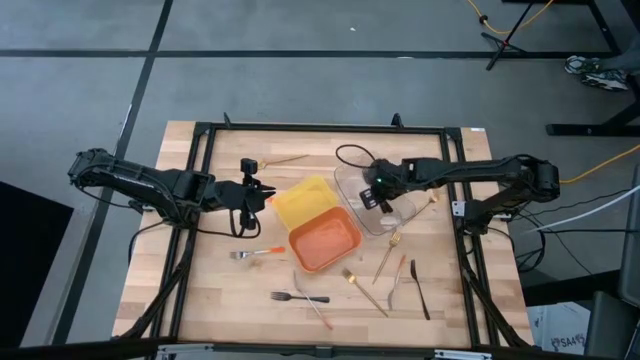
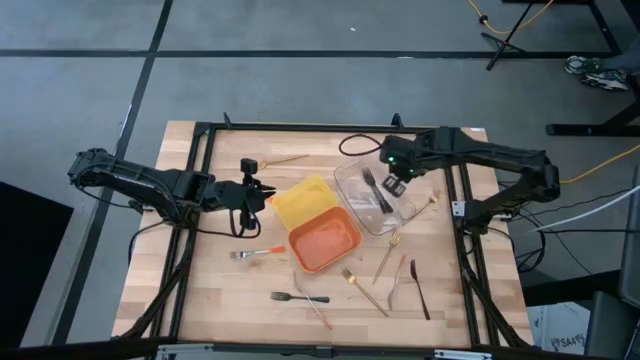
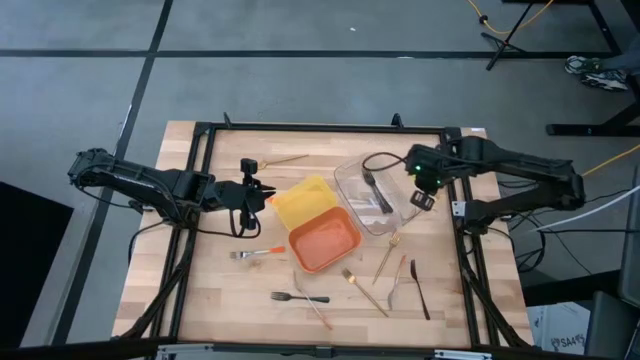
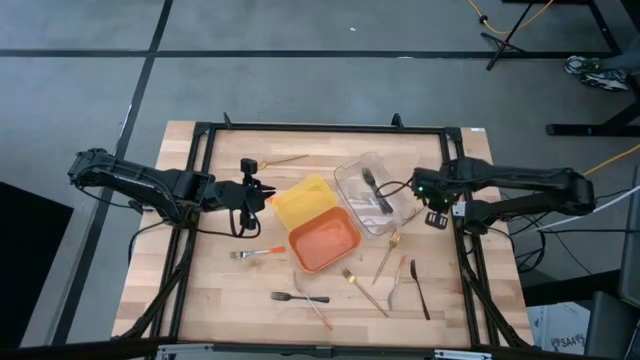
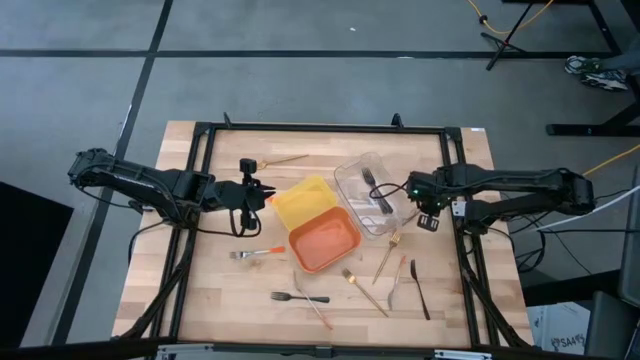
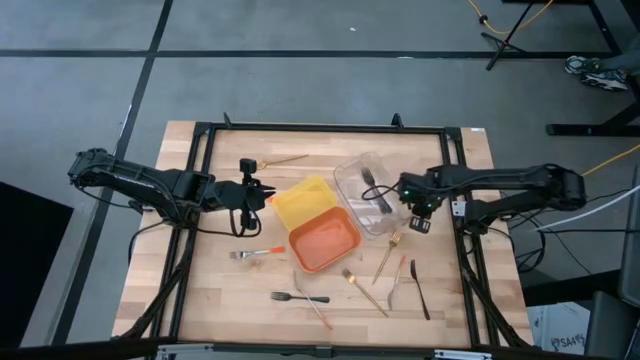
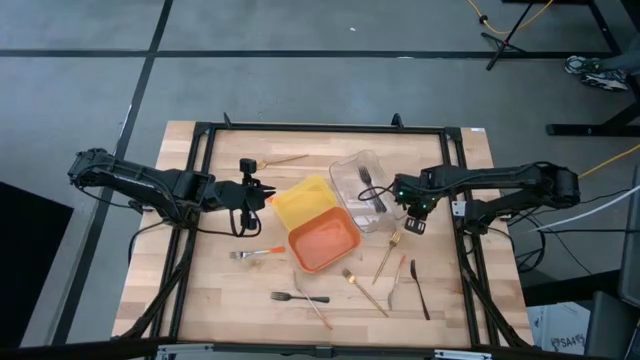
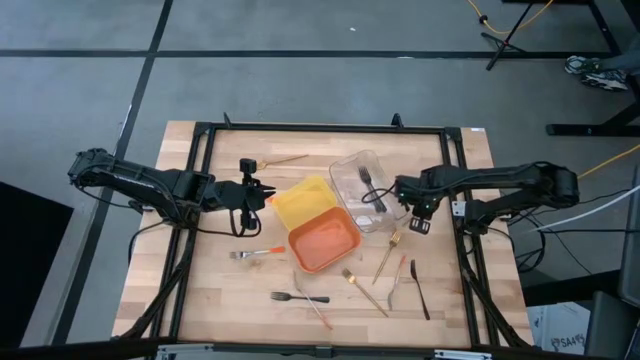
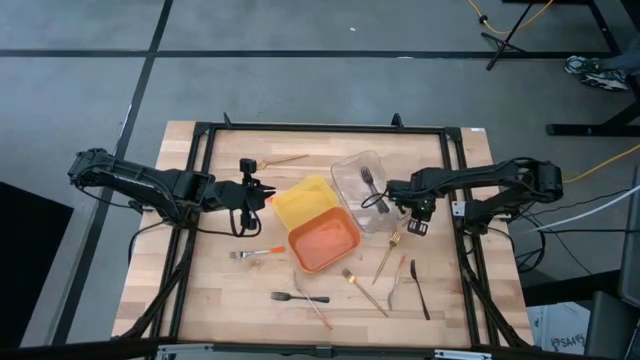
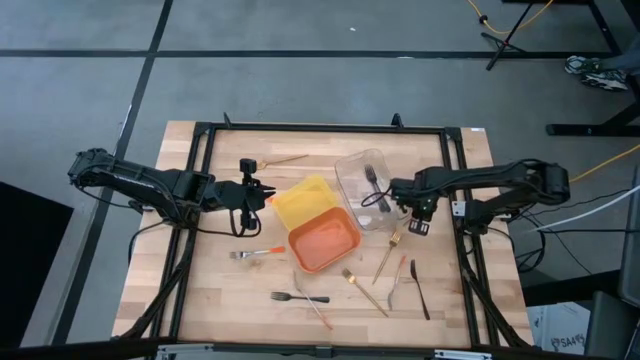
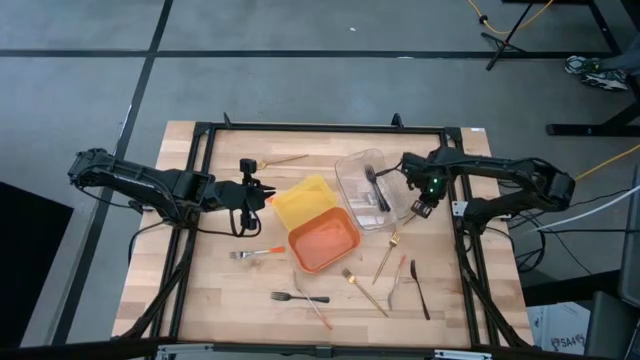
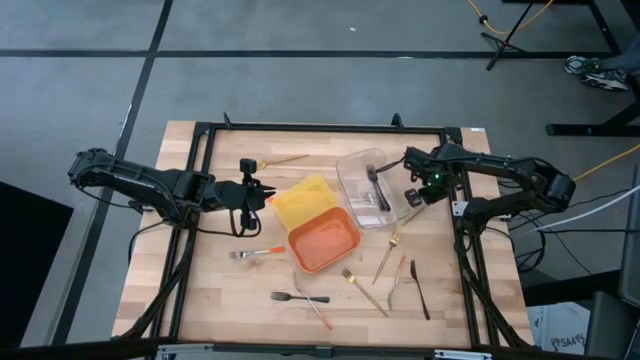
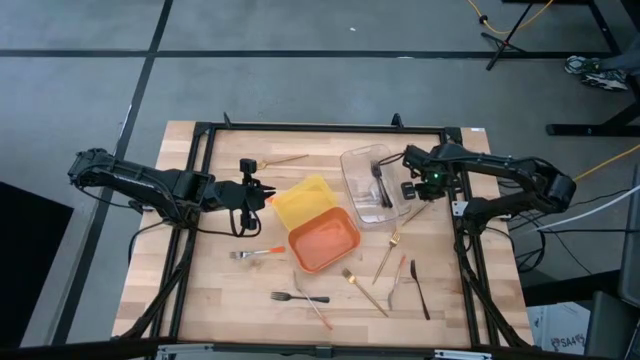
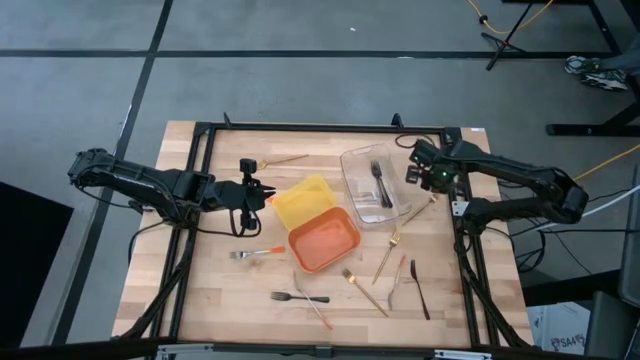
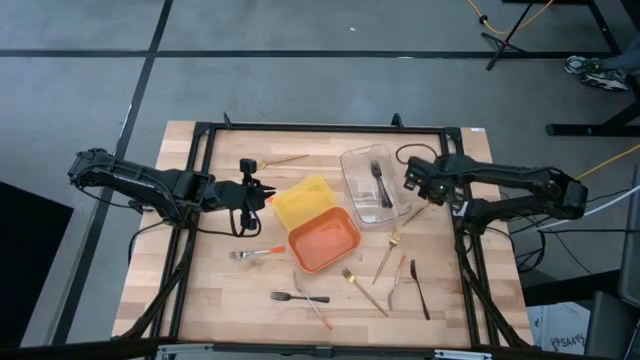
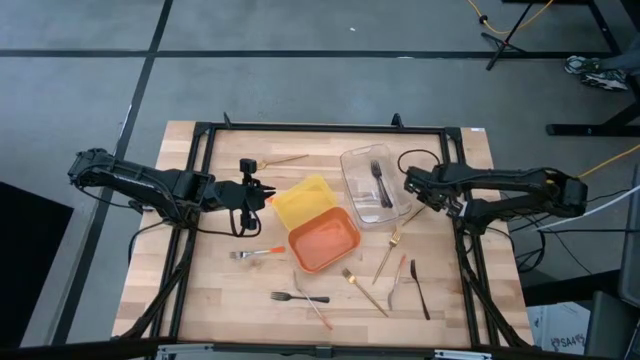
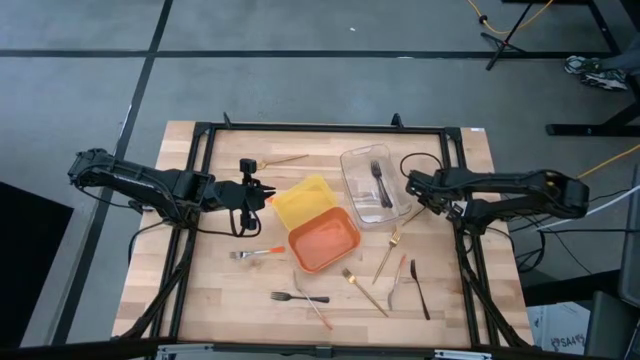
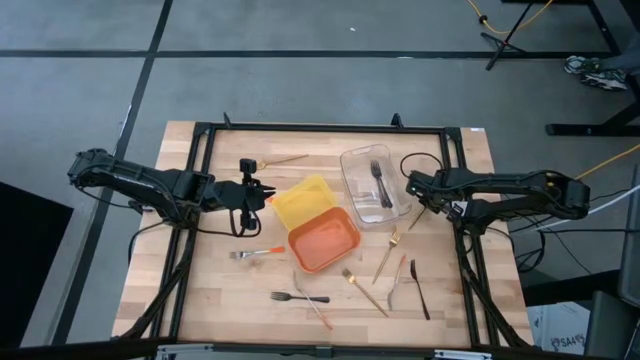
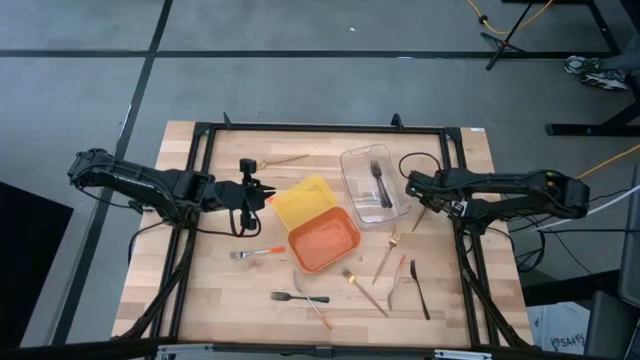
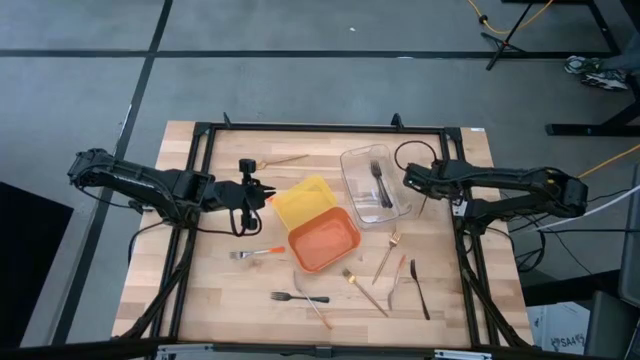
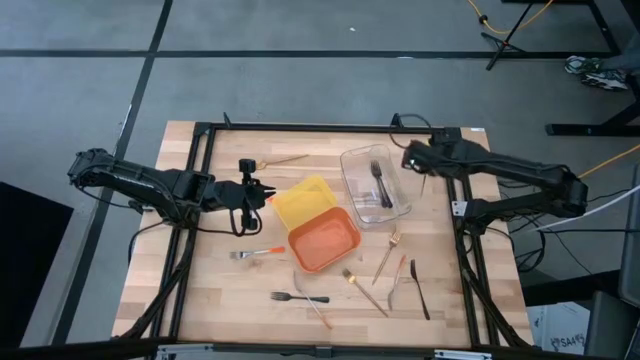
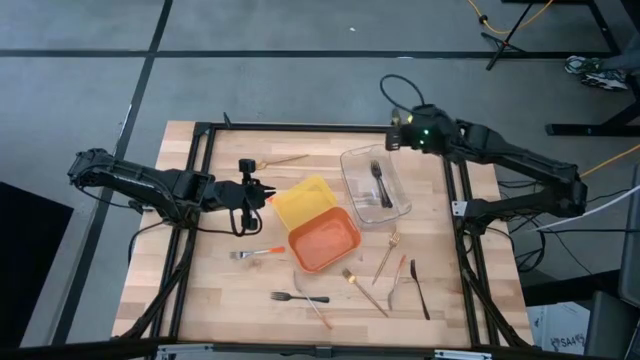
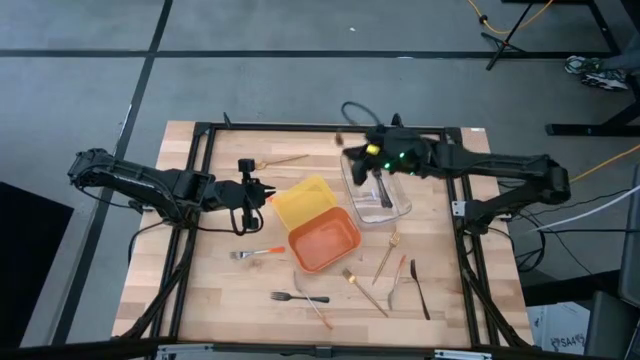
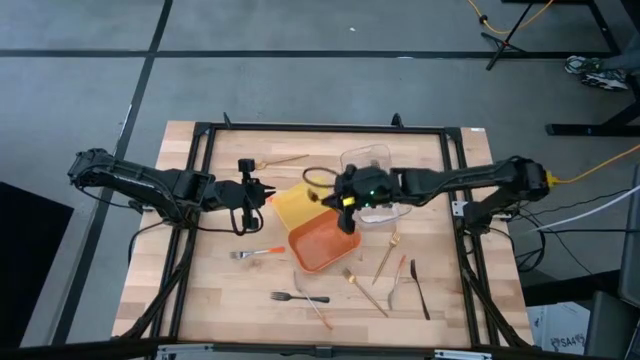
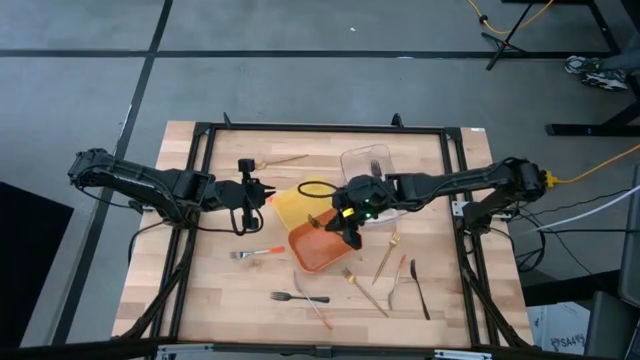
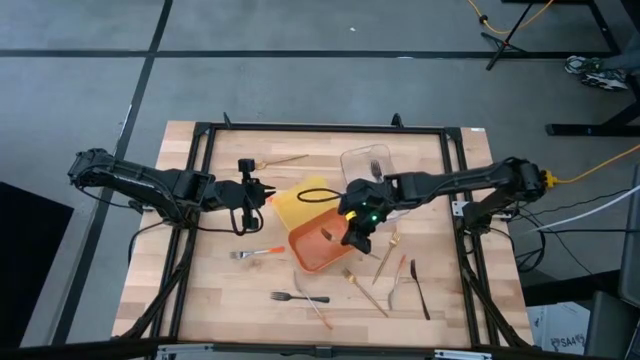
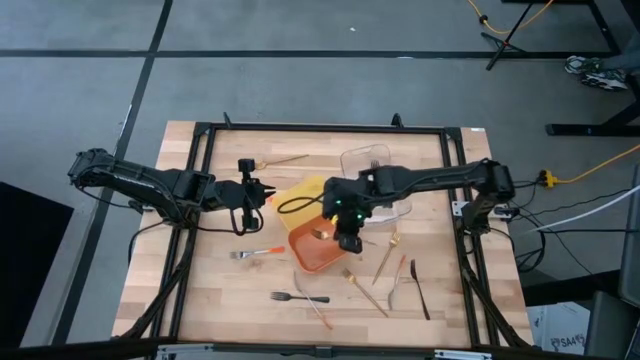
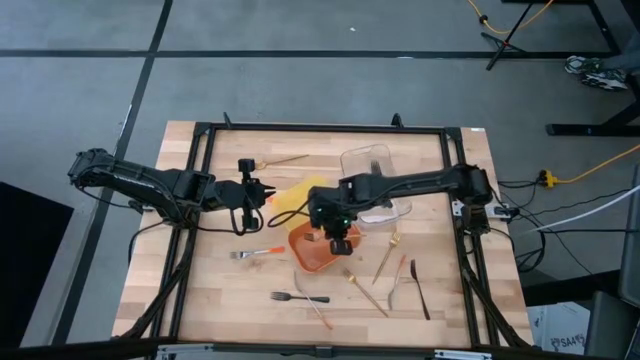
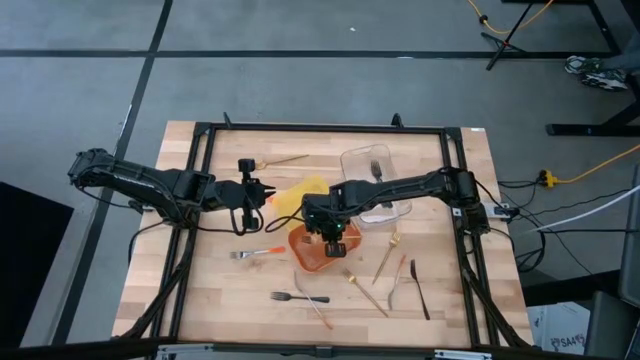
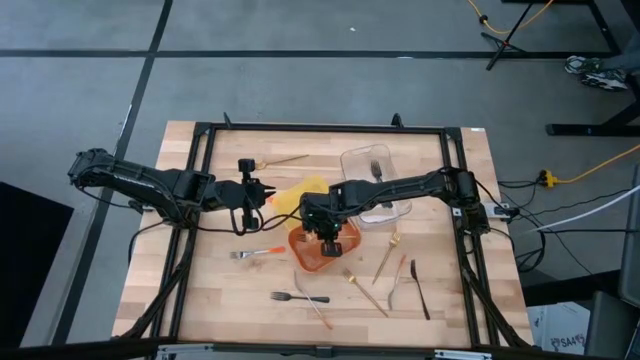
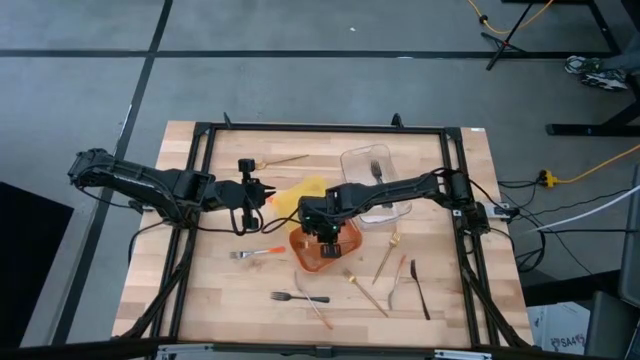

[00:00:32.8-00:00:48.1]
Task: Sort silverware by color (type)
Put the gold fork into the orange bin

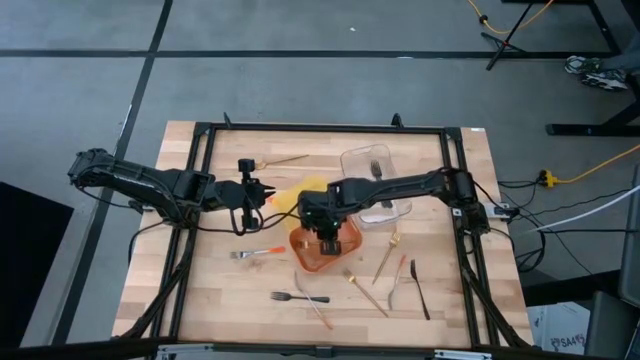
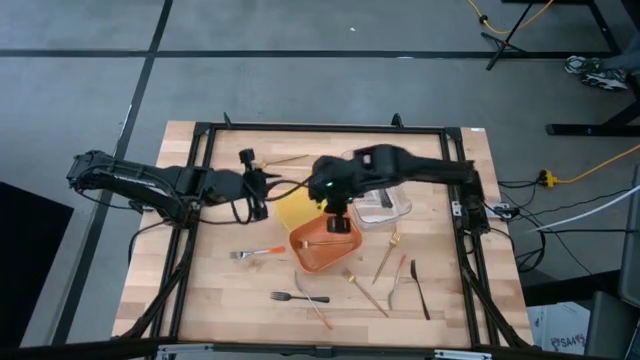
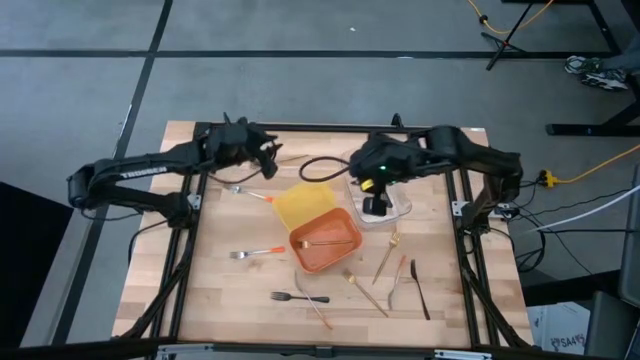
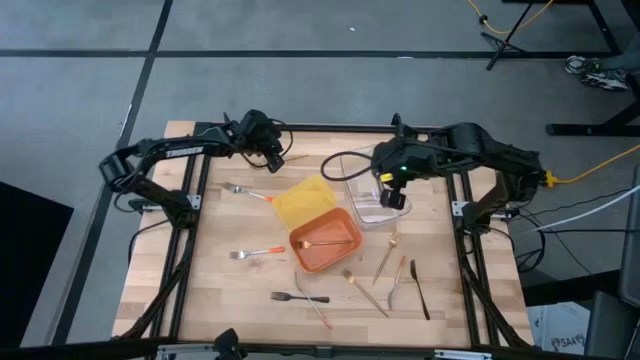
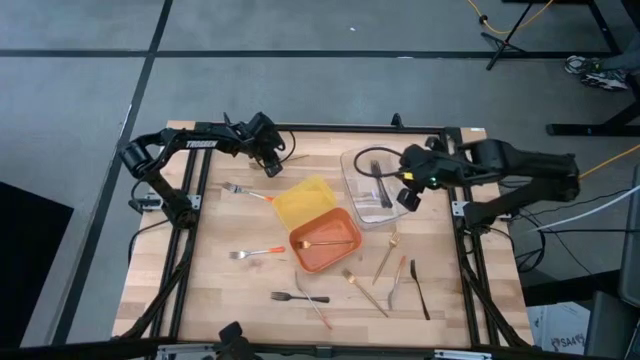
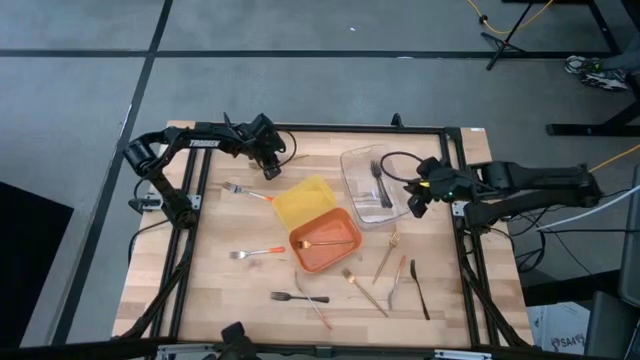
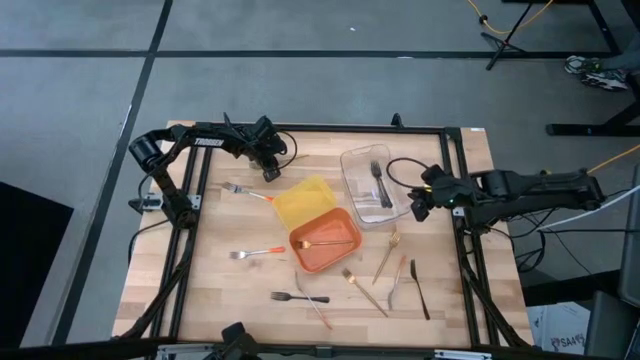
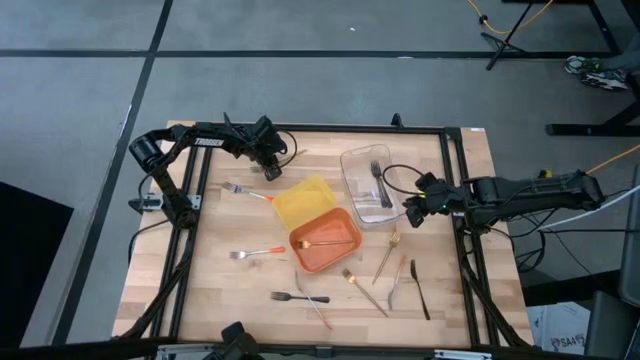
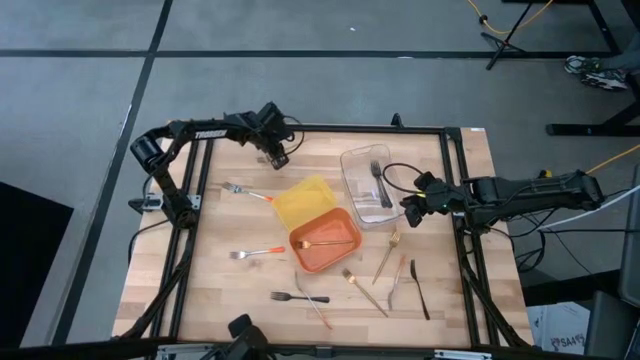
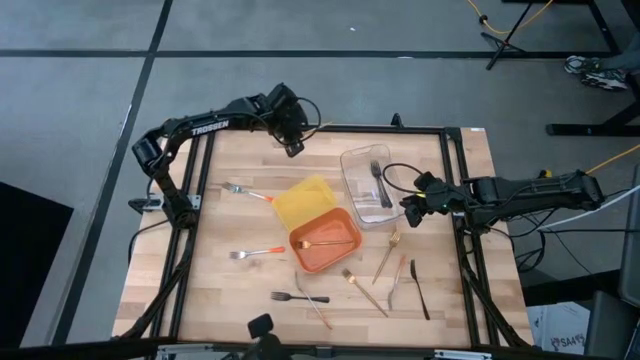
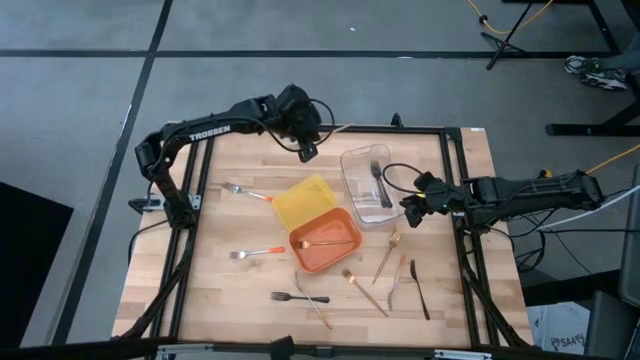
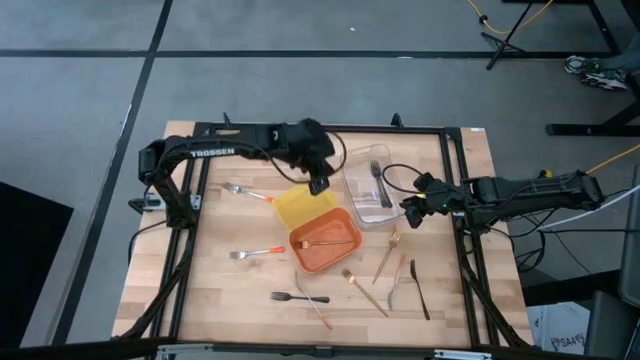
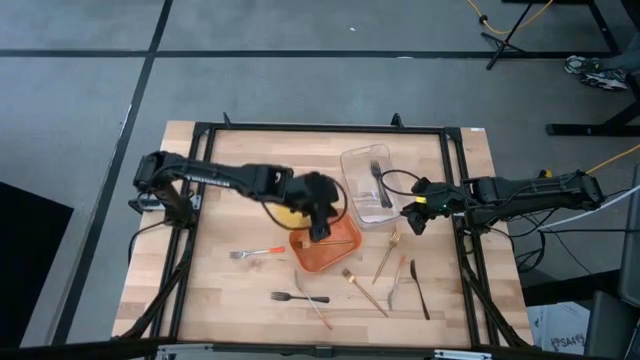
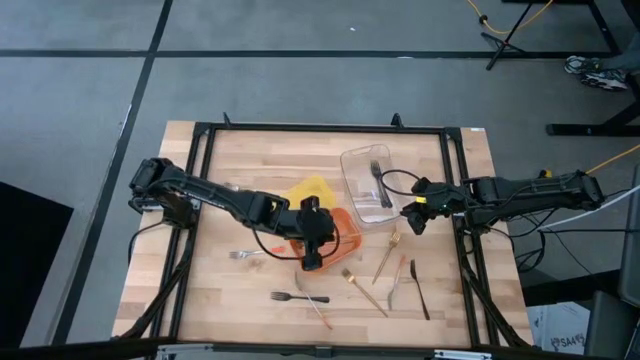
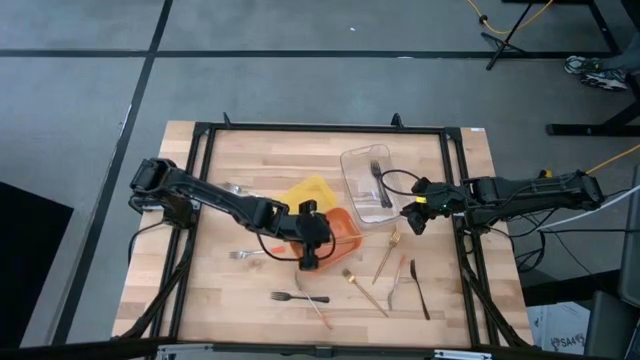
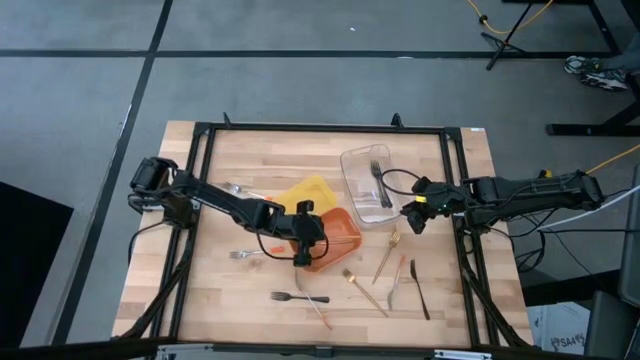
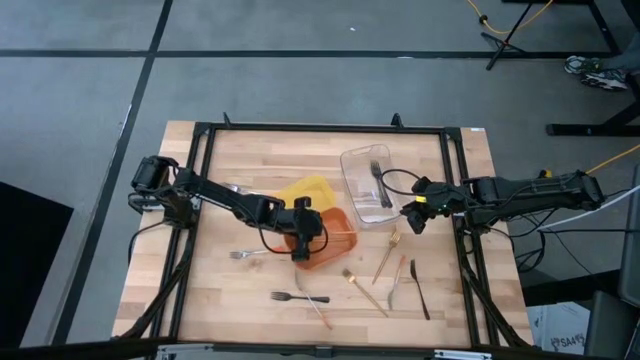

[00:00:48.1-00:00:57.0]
Put the gold fork into the orange bin
